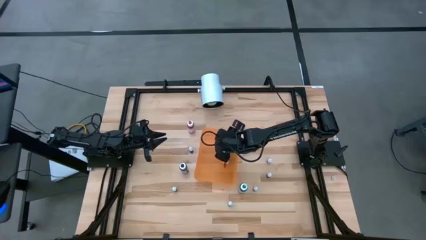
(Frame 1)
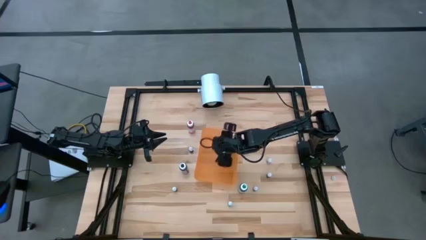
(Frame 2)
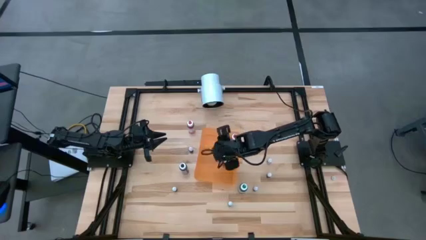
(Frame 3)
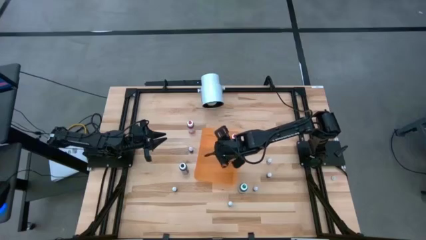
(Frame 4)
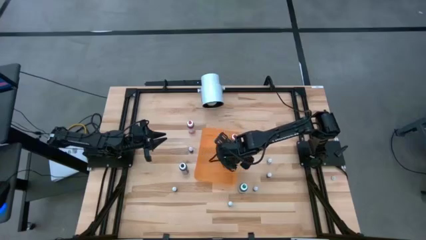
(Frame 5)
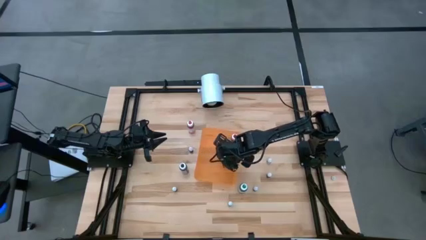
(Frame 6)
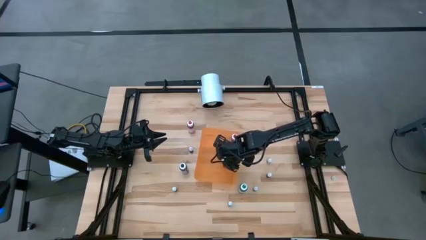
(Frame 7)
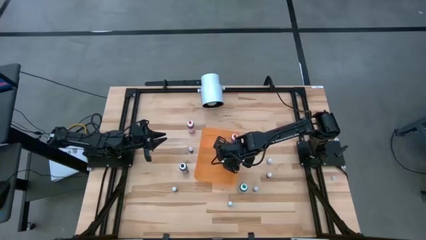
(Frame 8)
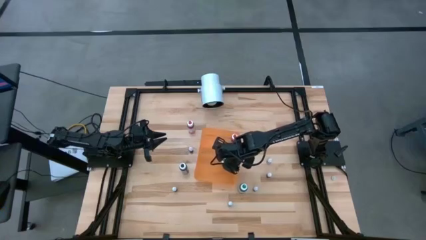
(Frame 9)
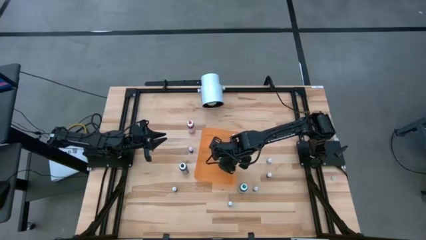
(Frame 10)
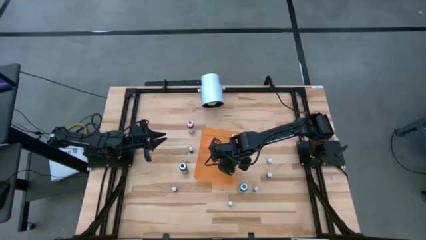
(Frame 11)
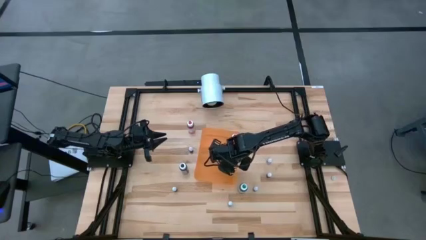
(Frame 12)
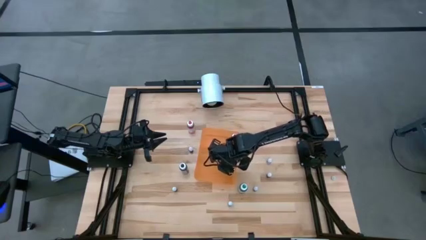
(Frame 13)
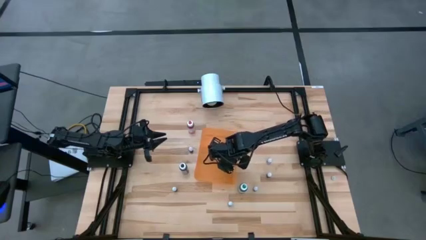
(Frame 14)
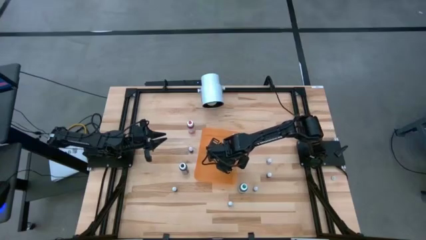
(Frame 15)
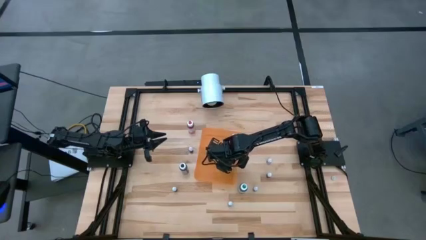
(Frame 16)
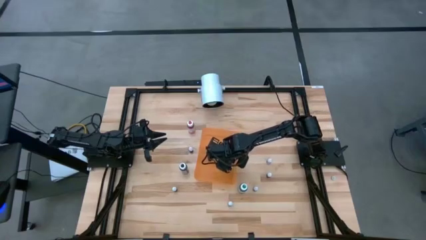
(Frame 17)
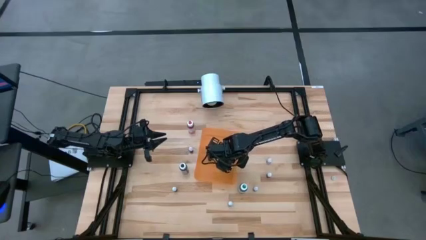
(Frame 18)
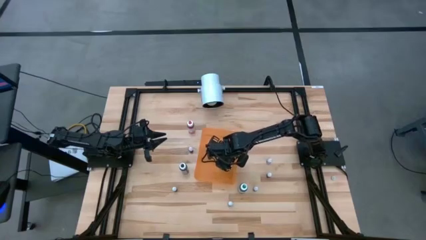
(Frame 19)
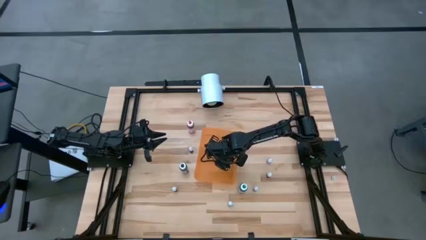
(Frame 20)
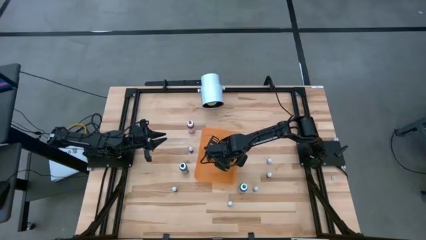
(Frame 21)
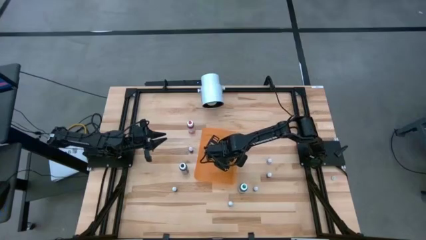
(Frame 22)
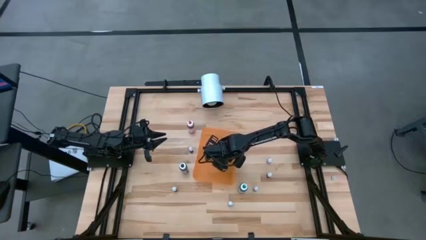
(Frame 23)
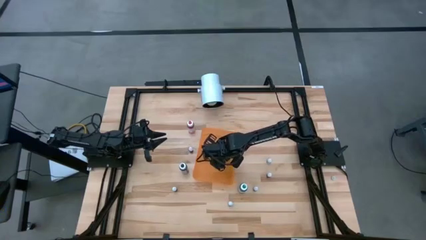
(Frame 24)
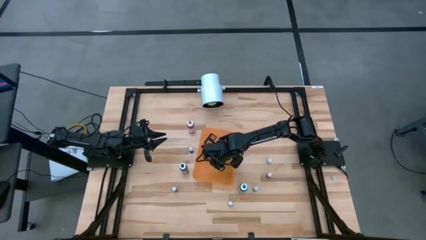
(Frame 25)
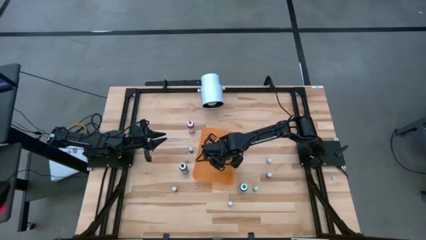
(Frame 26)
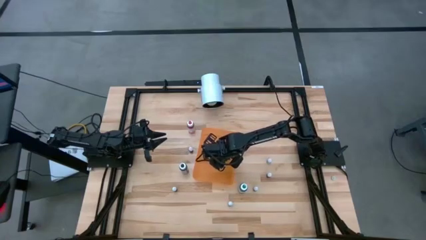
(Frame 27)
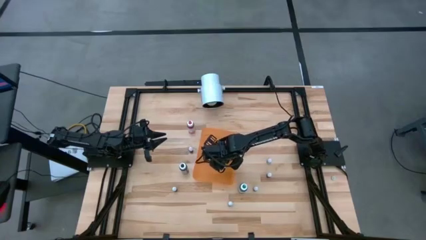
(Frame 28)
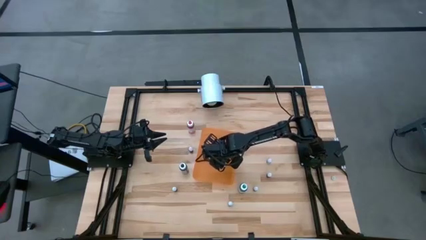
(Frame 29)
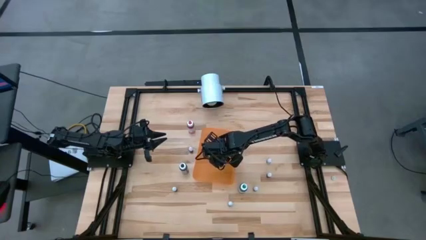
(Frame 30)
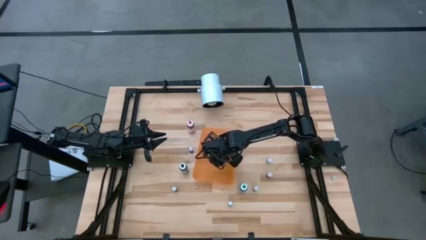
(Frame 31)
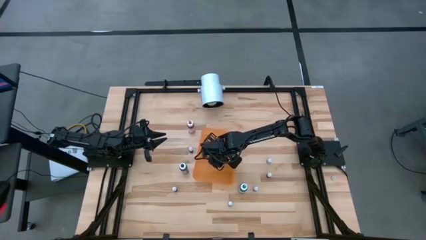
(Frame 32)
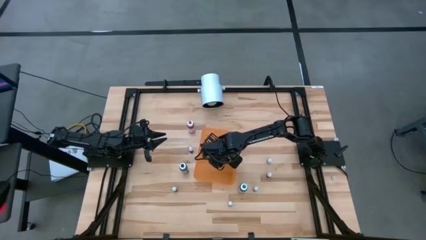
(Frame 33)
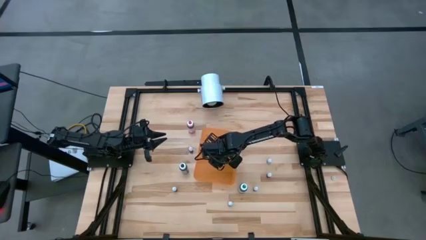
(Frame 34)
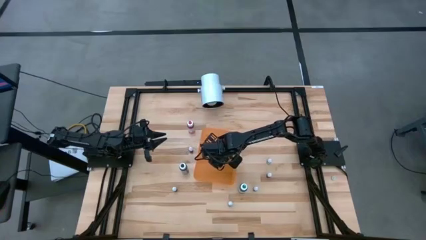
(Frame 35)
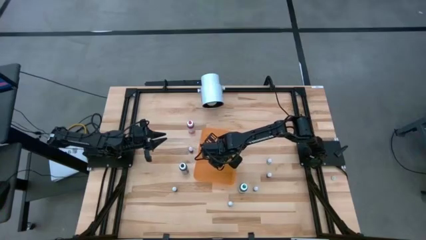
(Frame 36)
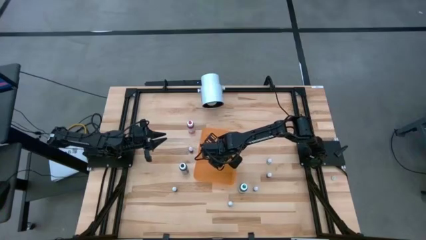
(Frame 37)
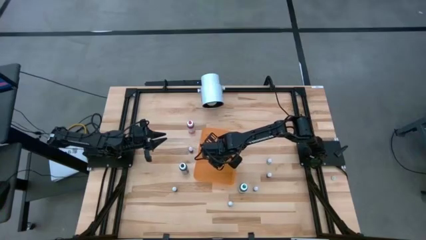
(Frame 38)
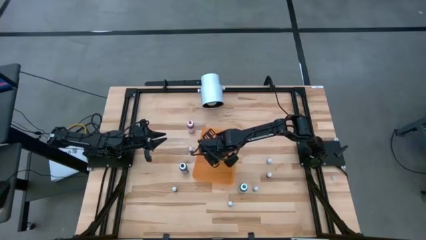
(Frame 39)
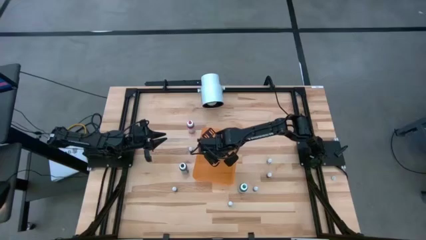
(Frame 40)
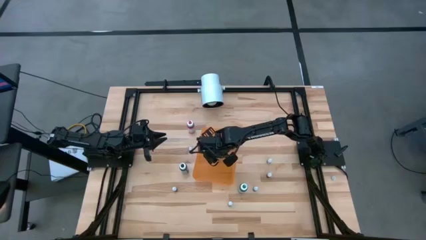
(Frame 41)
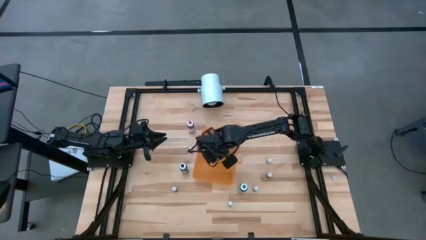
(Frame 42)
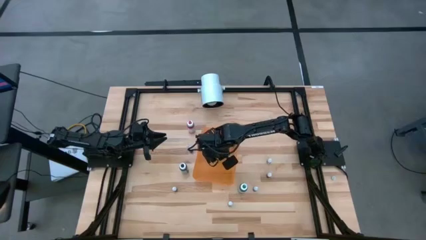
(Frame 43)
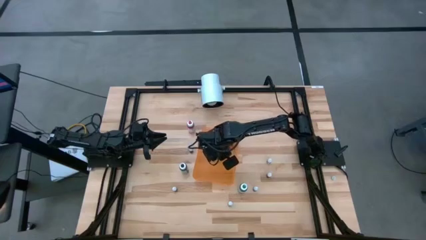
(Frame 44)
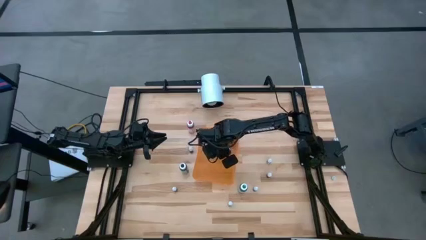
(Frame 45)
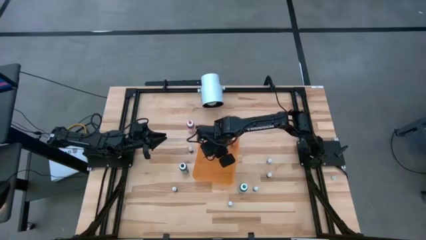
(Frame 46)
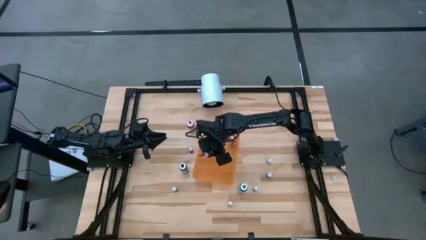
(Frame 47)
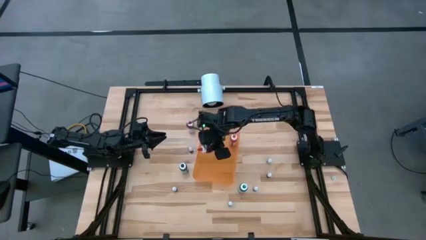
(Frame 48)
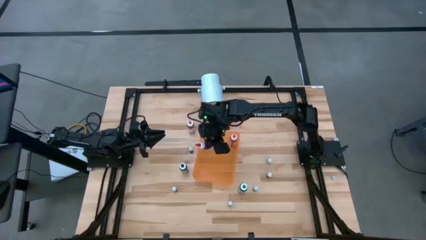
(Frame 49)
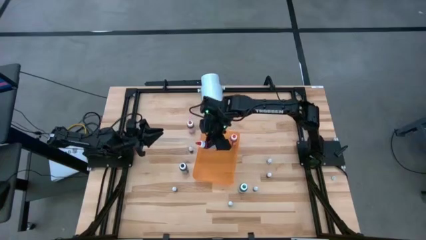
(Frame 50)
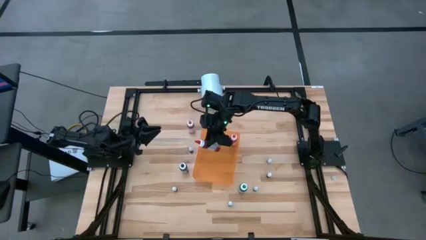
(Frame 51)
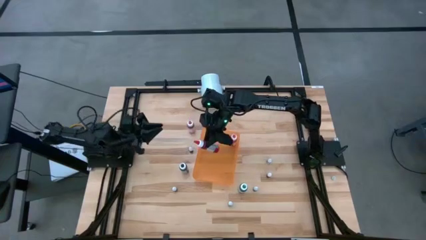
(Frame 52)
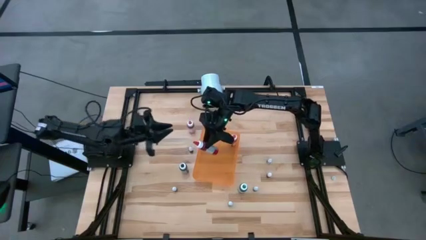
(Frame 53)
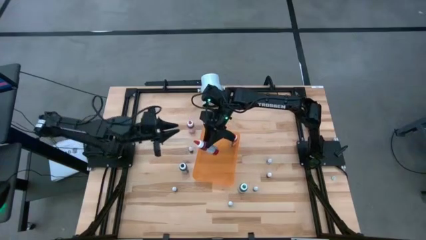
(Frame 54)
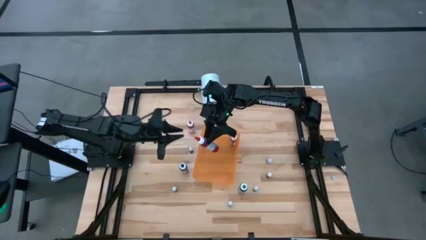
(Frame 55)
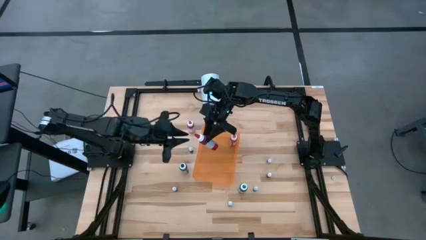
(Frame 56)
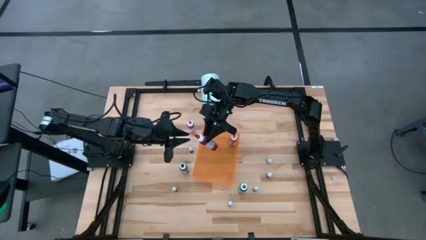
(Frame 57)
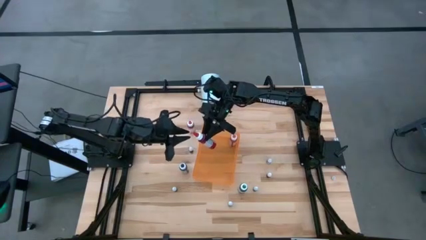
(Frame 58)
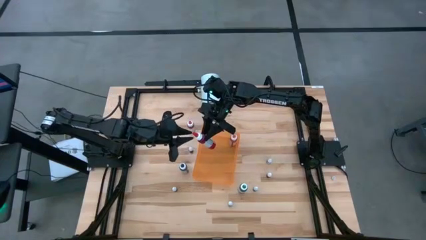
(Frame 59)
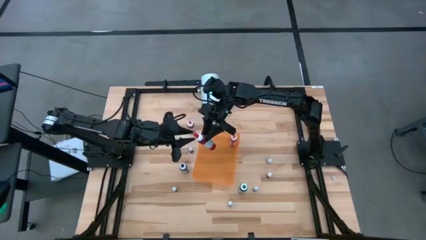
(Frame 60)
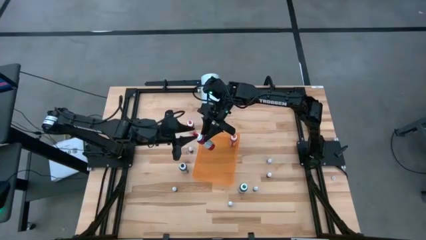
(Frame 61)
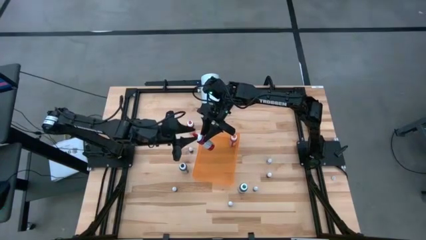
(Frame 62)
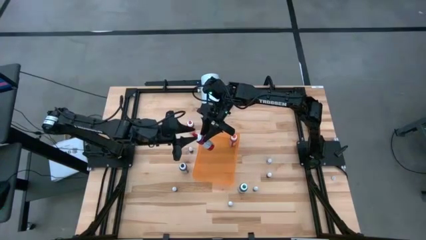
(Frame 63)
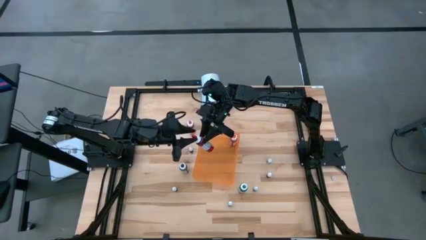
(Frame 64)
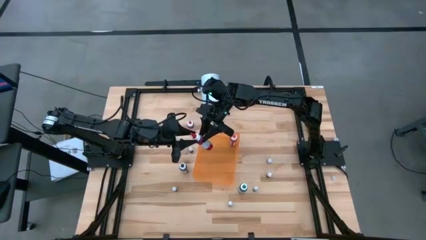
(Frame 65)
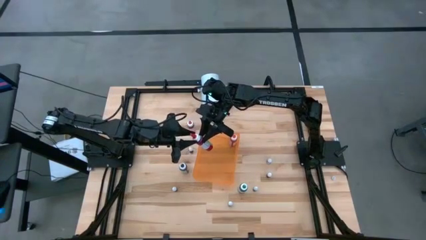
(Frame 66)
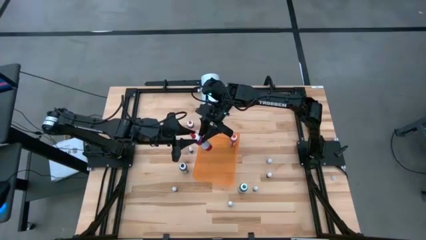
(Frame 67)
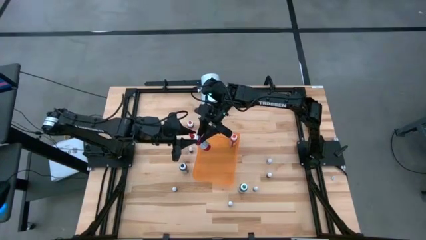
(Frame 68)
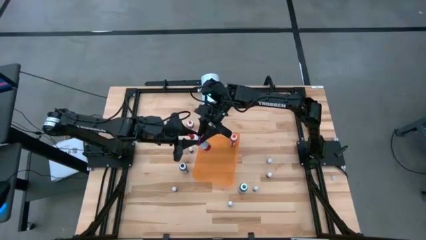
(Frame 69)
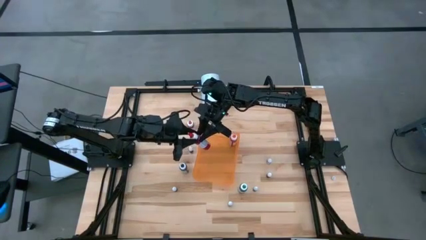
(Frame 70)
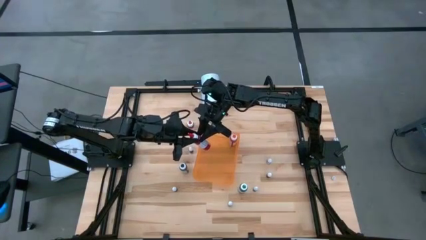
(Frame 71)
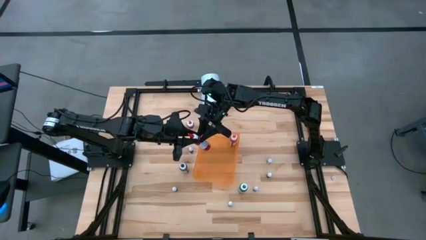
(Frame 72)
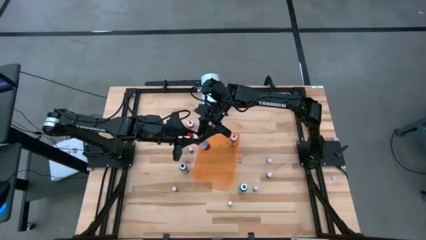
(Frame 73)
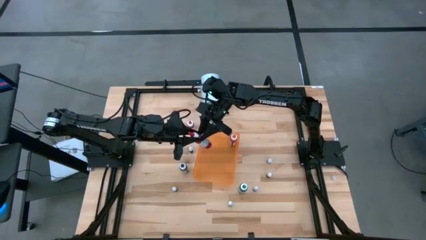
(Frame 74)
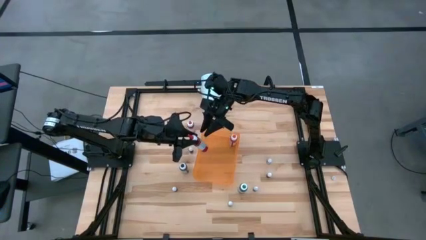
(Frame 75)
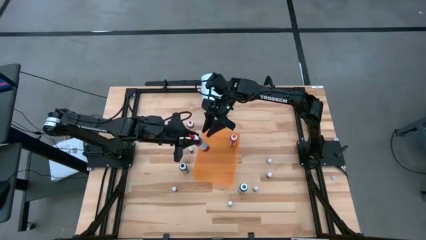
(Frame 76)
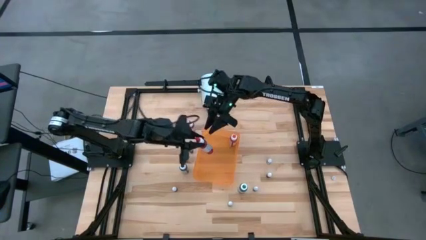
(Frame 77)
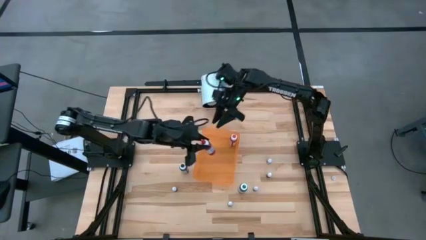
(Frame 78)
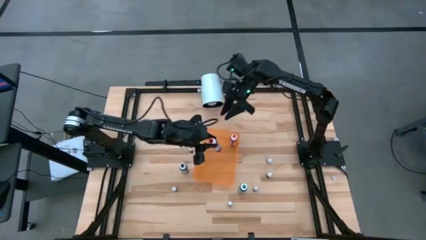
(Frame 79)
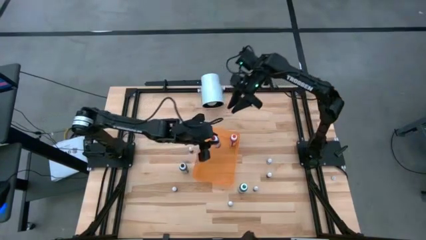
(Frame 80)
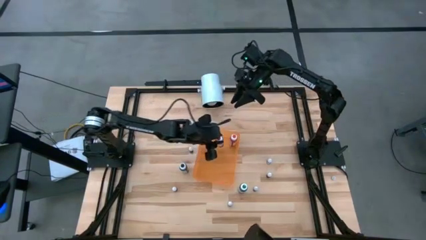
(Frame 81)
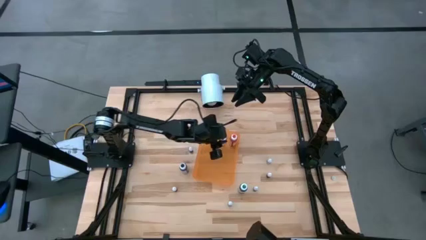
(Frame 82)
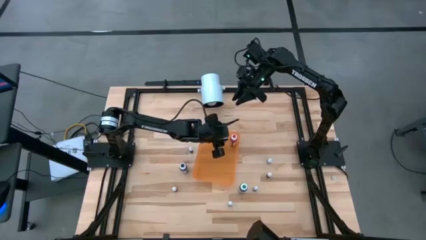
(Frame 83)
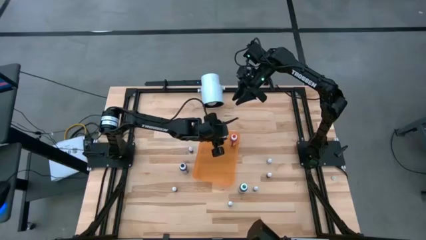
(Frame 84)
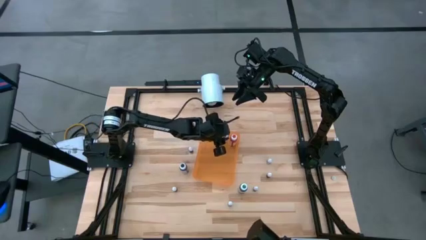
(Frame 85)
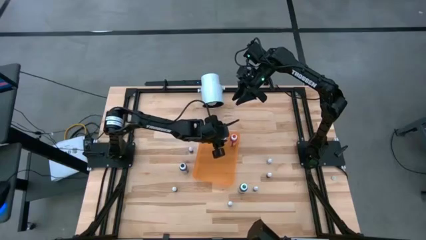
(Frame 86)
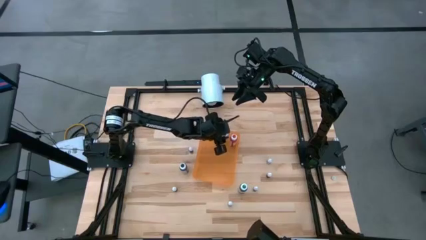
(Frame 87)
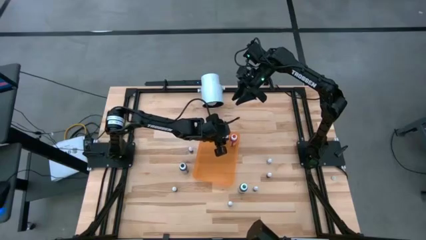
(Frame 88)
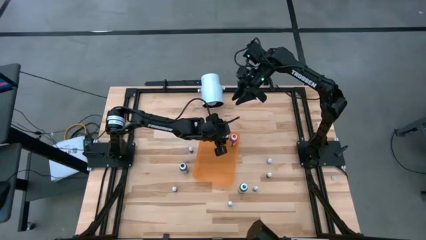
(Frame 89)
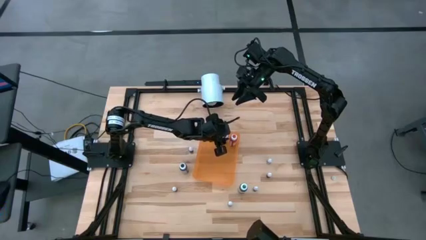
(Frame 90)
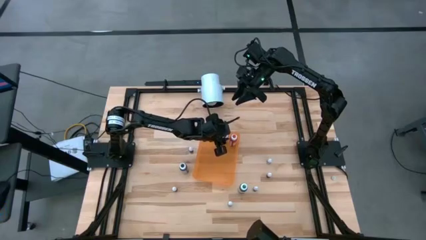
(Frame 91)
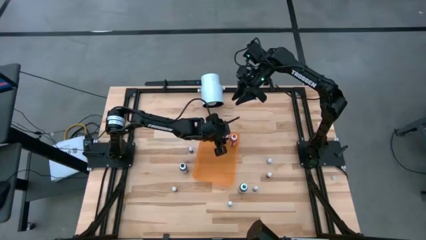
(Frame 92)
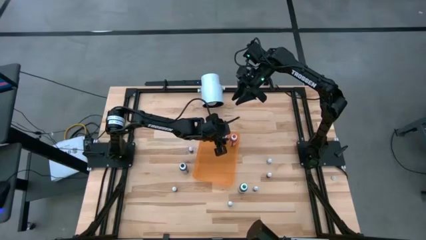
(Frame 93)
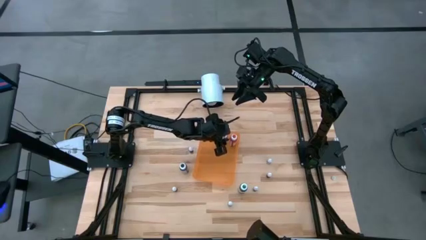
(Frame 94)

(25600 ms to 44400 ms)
Task: Pick & Place food coloring
Put the large red food coloring bottle into the orange bin
